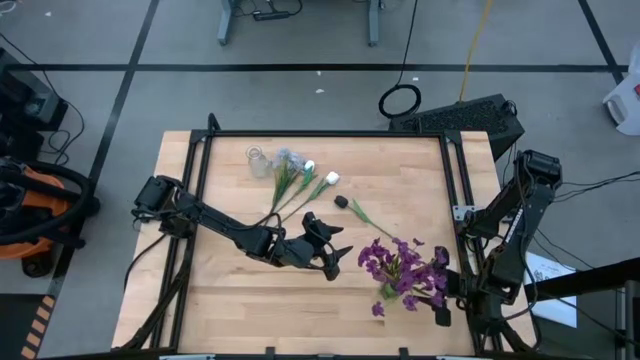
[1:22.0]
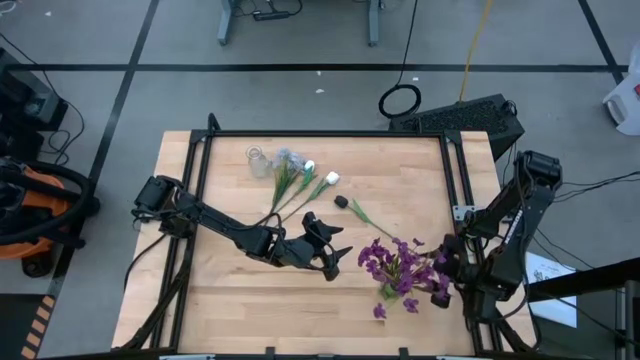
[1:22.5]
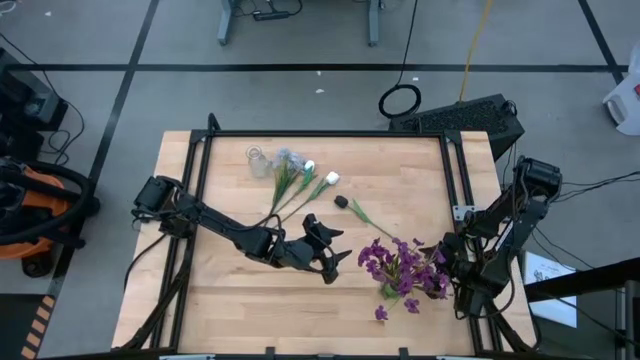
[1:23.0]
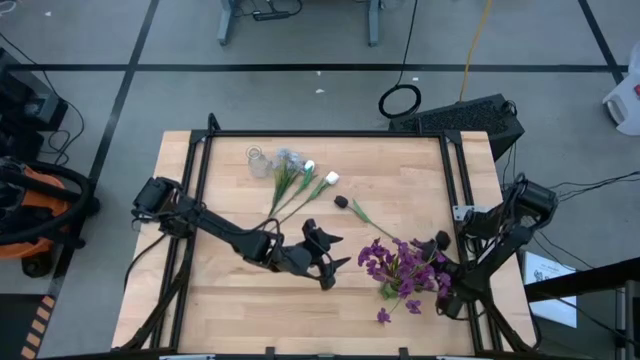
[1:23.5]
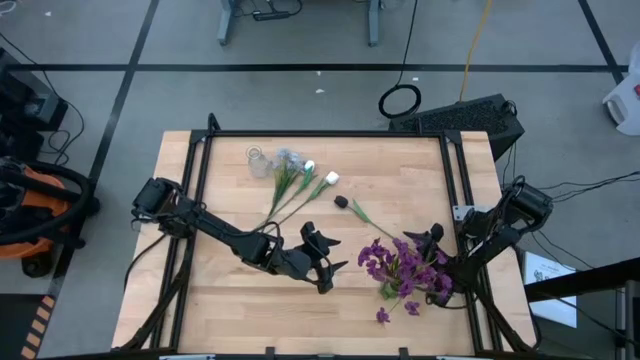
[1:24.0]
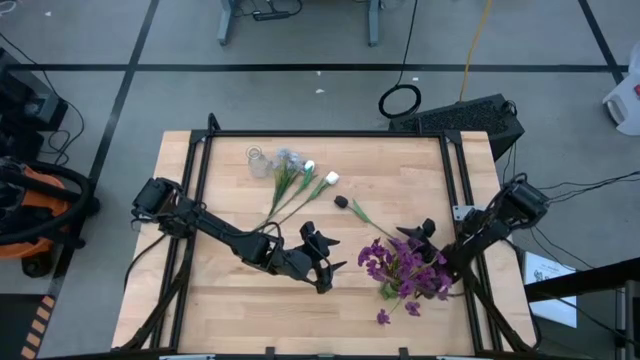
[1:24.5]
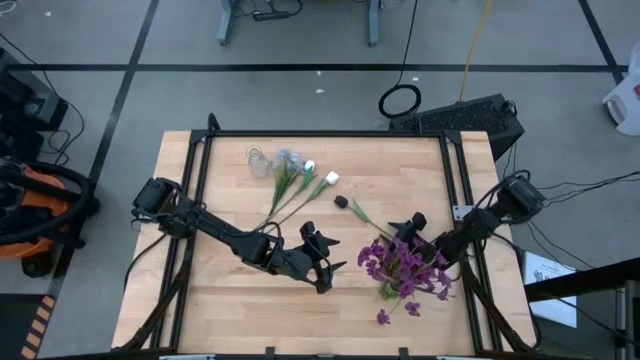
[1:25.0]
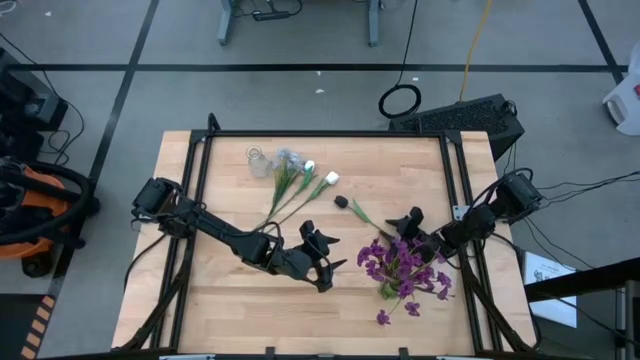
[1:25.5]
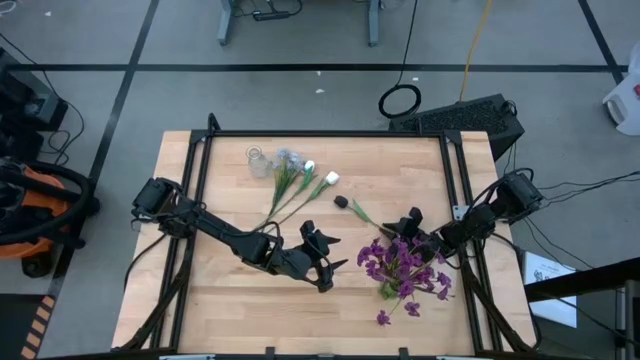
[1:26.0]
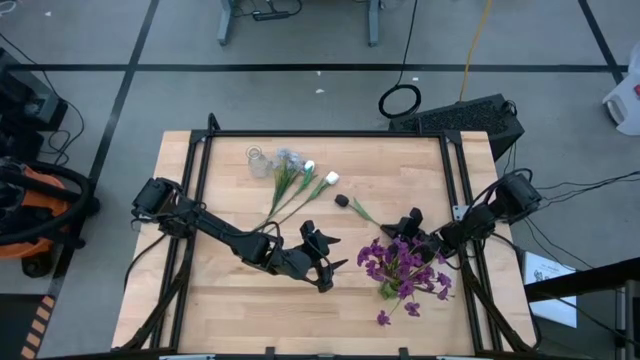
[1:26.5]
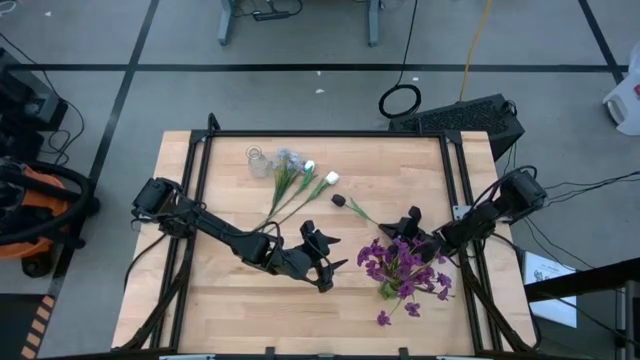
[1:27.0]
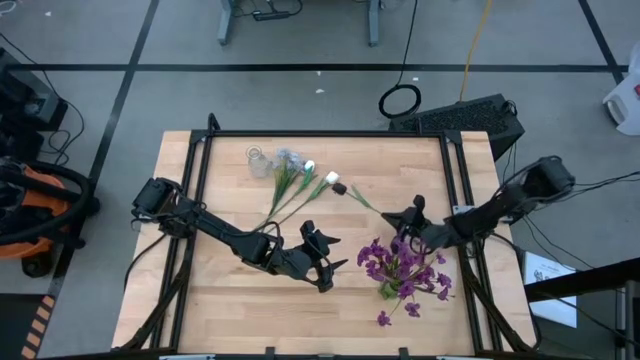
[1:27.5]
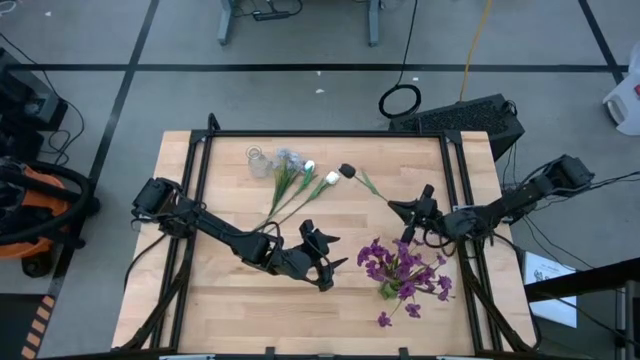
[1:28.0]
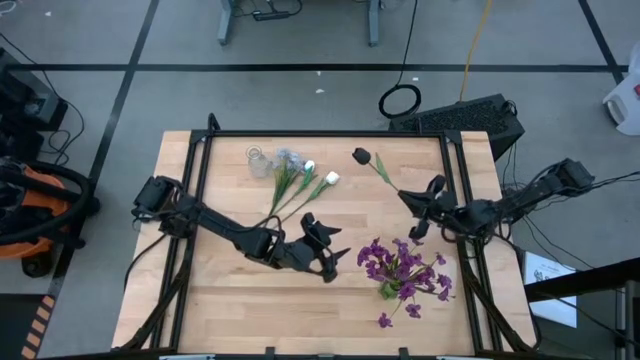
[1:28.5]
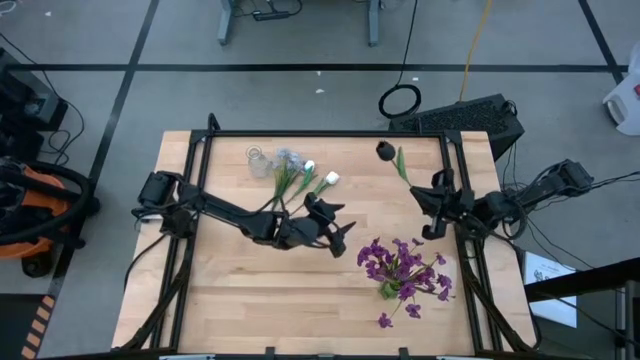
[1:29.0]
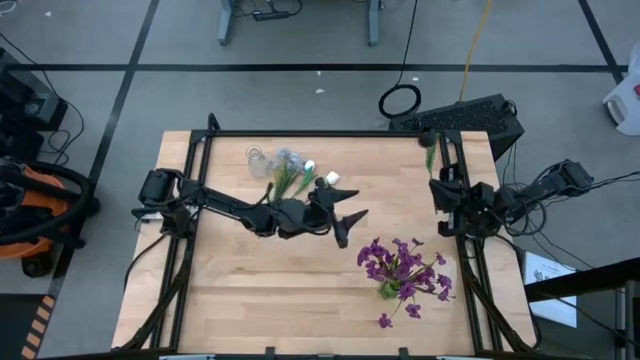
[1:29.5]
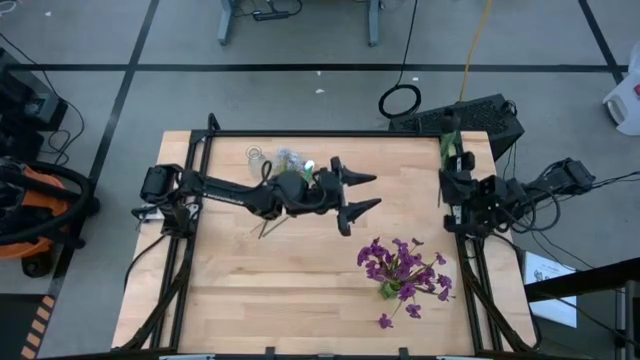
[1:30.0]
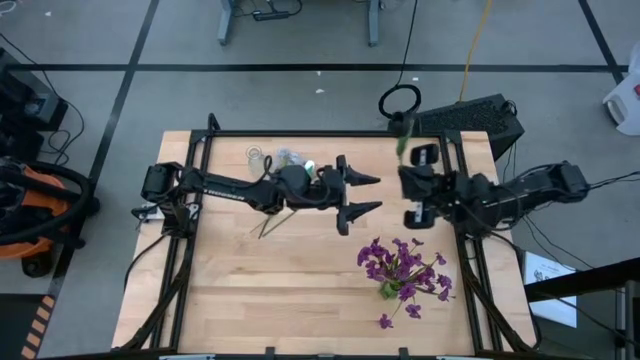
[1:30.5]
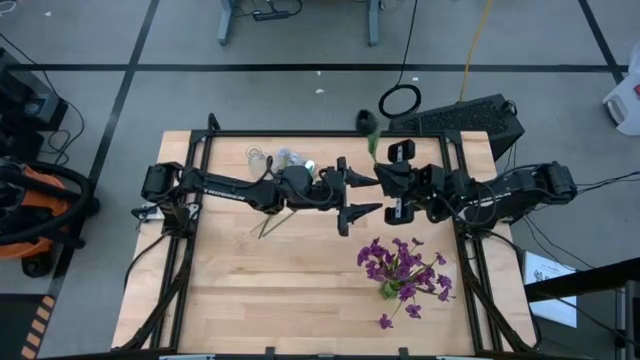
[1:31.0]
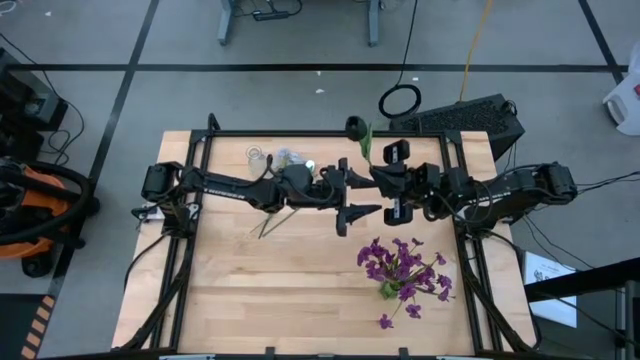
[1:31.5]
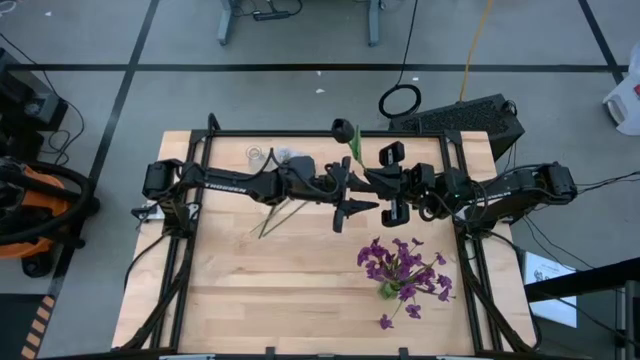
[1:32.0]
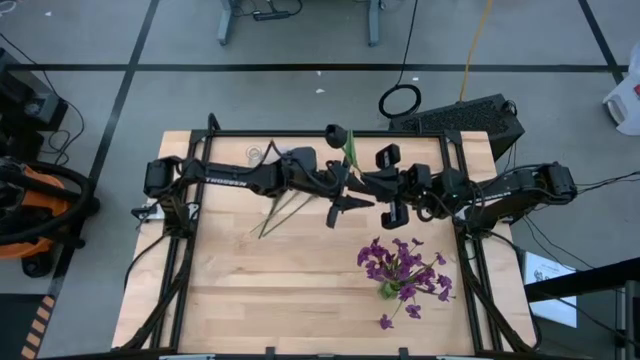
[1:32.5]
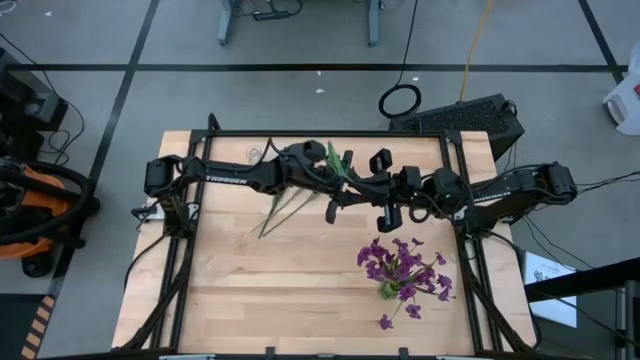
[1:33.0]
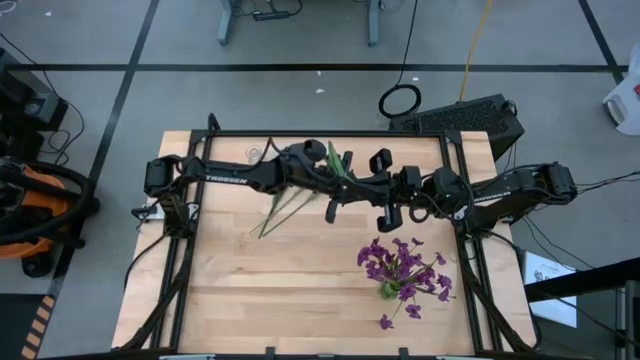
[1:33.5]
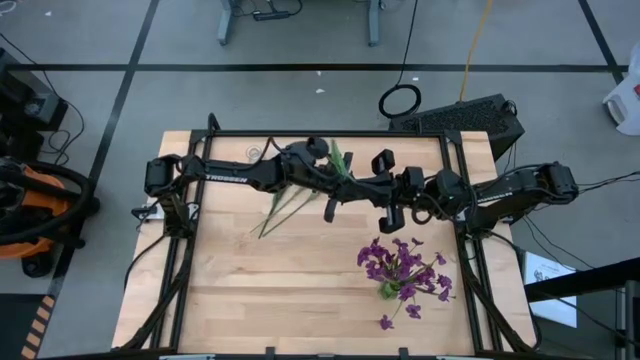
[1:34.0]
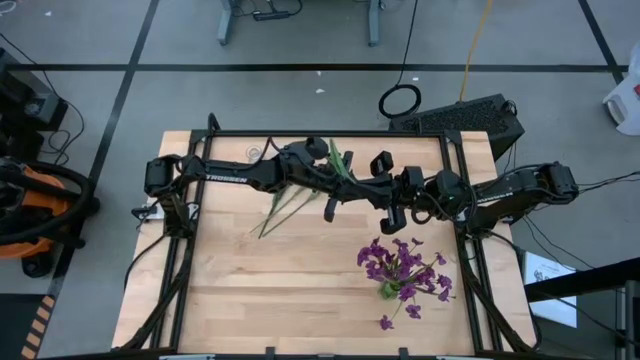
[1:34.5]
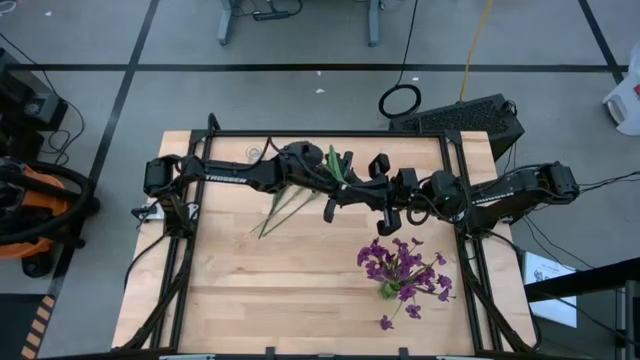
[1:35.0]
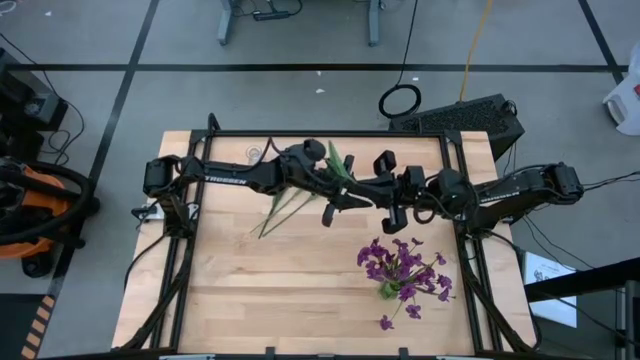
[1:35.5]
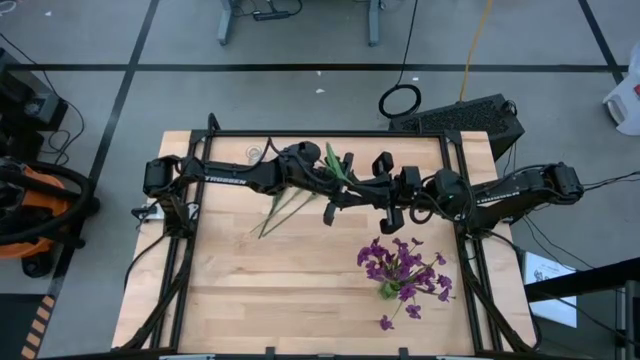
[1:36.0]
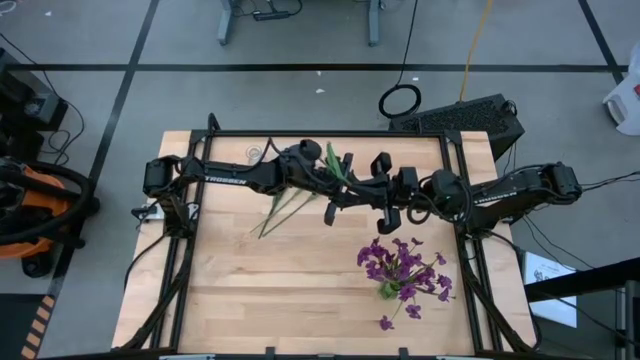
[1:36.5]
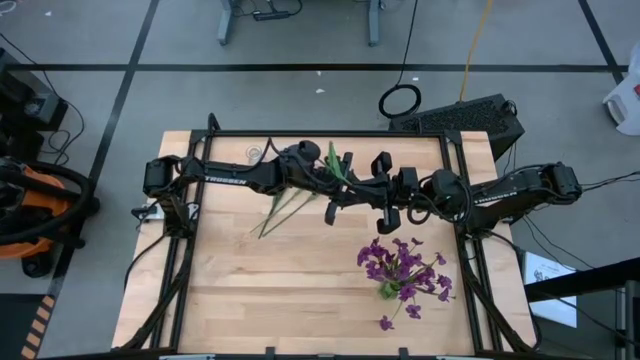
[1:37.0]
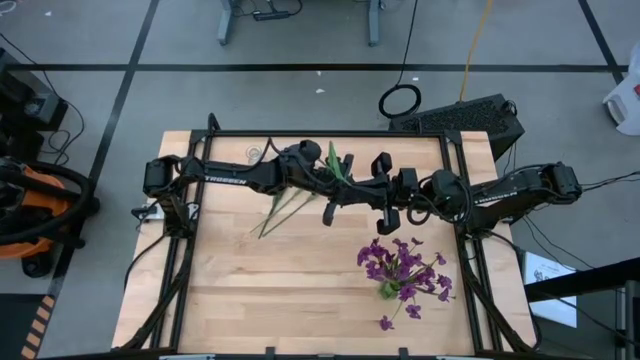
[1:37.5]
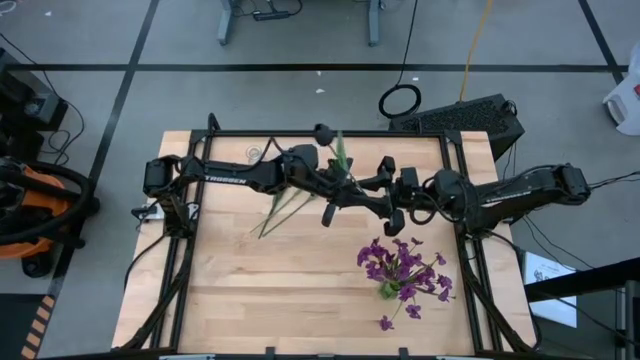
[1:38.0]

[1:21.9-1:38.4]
Task: Sort flowers into vase by color
Put the black tulip into the green vase

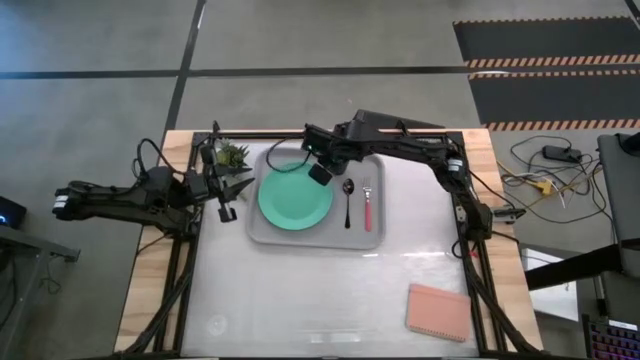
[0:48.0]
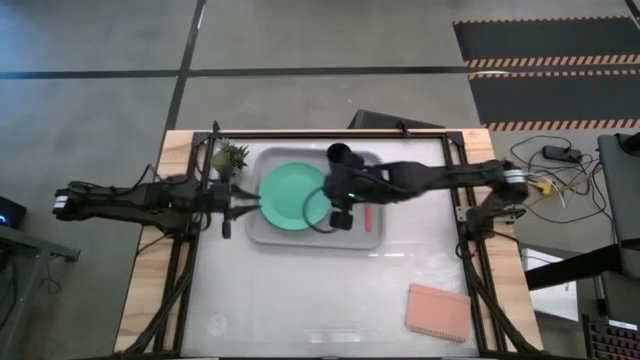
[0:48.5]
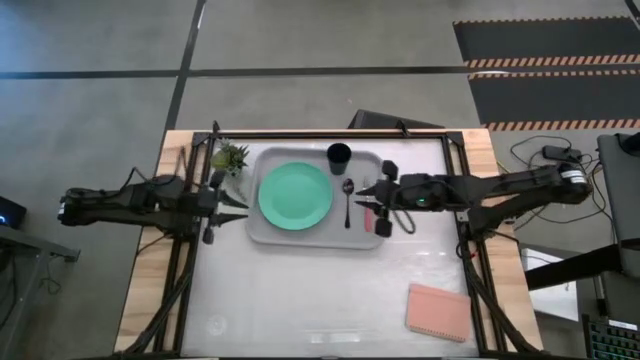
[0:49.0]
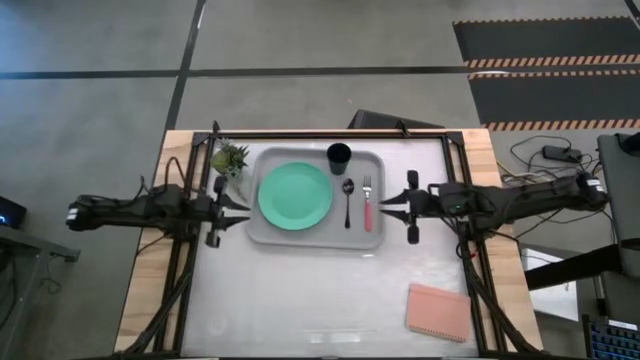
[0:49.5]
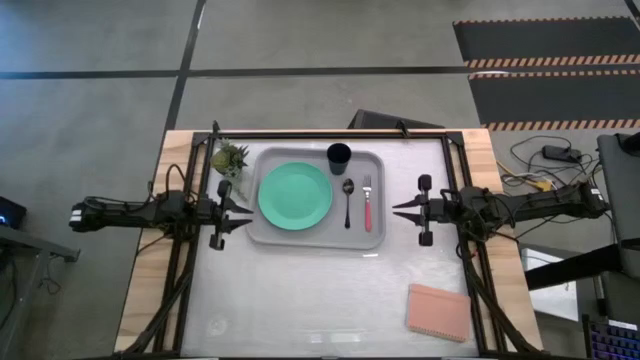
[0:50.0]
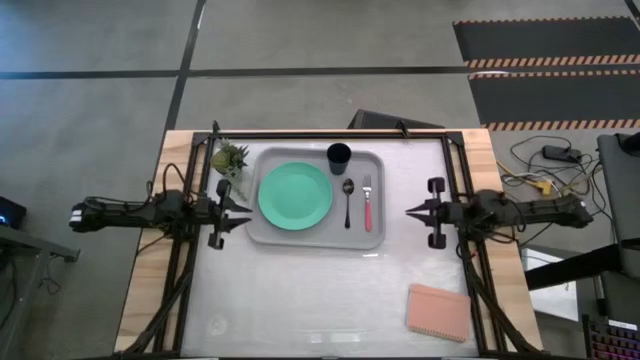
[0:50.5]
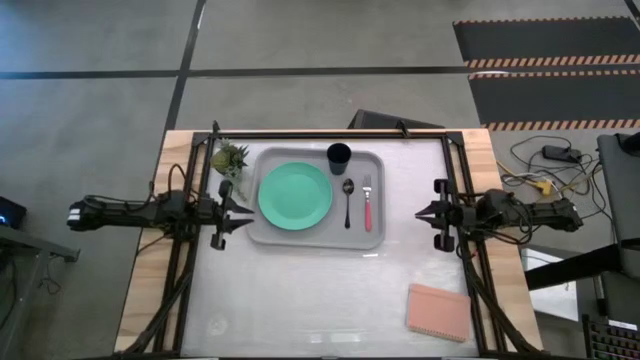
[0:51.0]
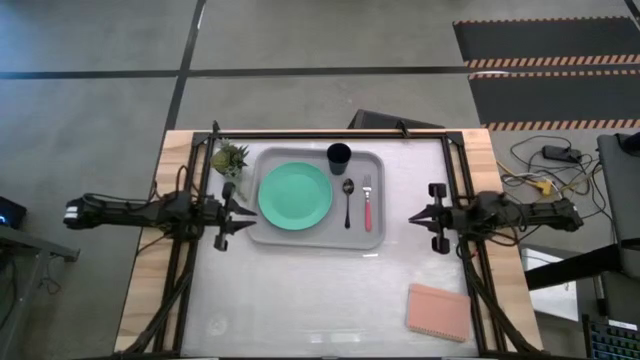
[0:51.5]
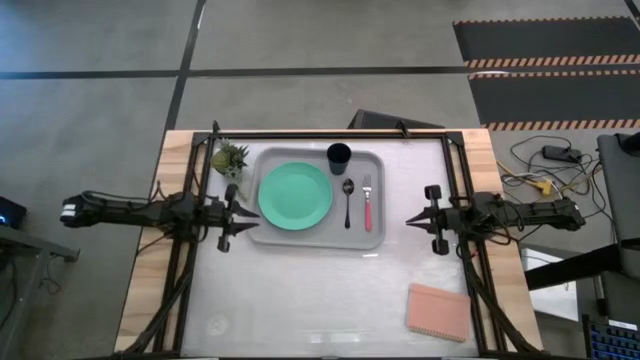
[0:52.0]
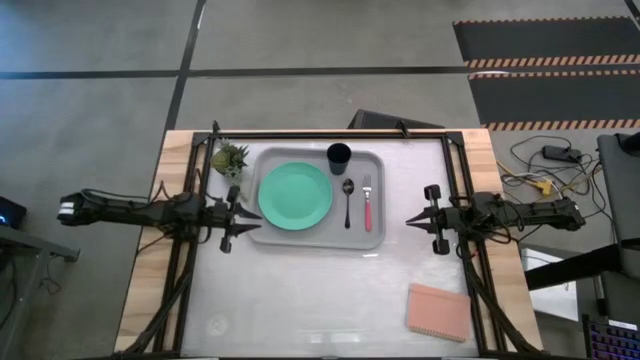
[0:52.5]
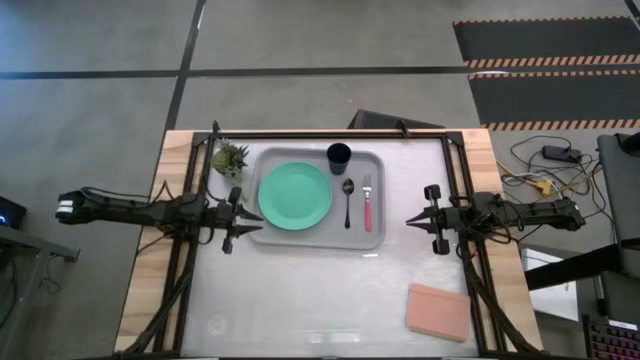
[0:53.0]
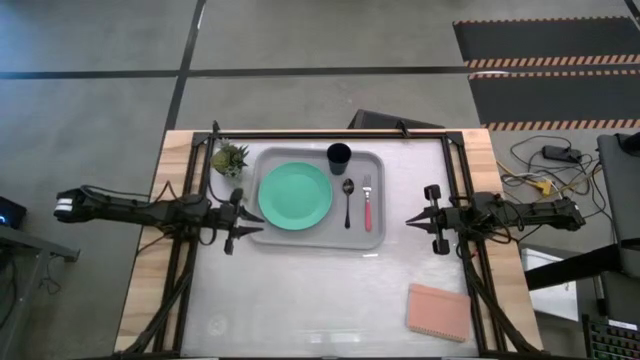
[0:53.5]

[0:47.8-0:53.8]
Task: Pick and place plate/cup/fork/spoon on tray
Return to Home Position
